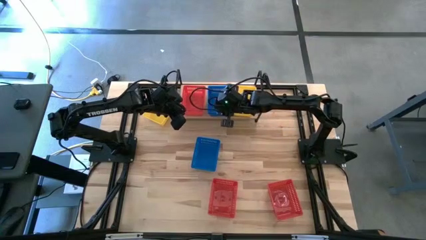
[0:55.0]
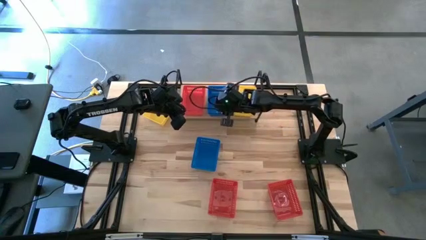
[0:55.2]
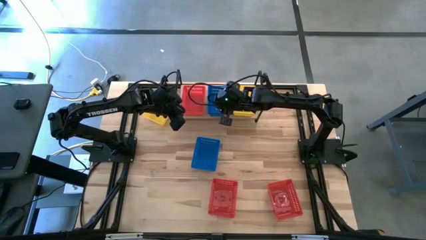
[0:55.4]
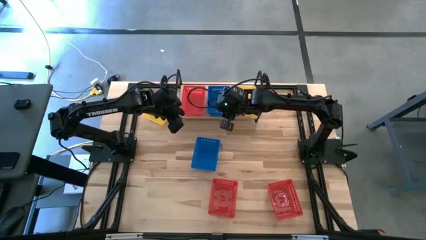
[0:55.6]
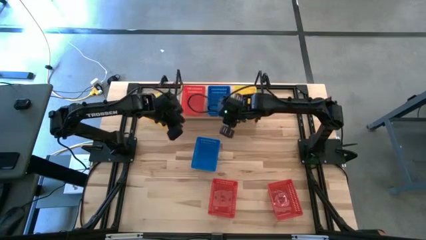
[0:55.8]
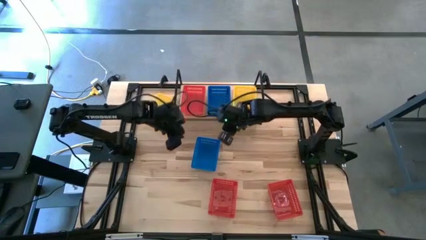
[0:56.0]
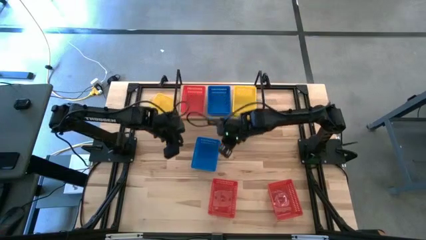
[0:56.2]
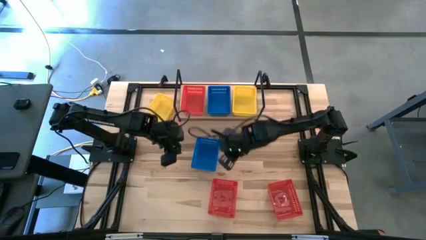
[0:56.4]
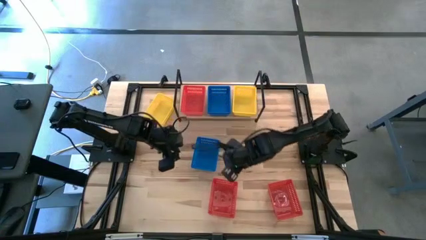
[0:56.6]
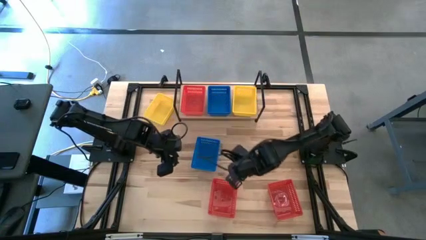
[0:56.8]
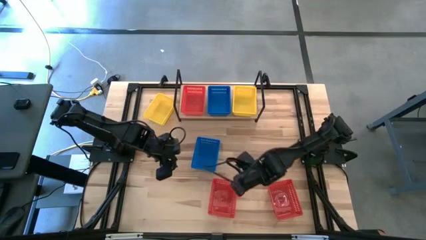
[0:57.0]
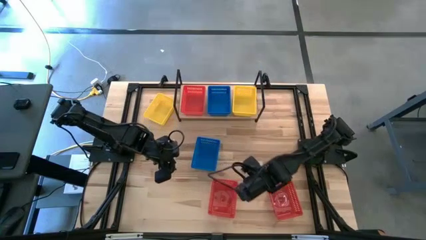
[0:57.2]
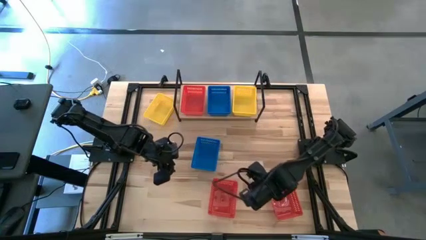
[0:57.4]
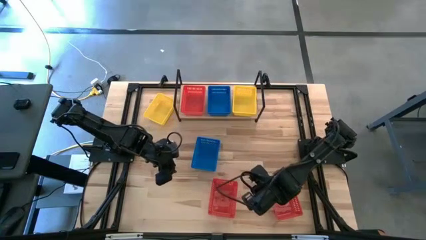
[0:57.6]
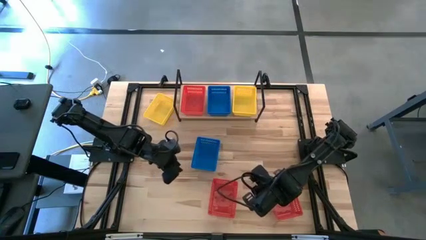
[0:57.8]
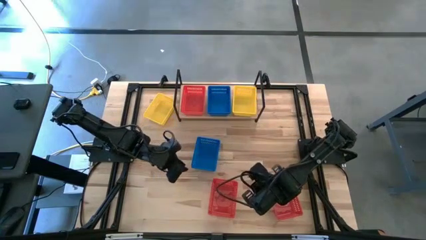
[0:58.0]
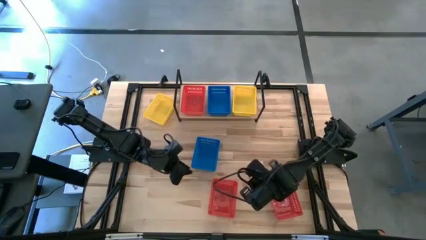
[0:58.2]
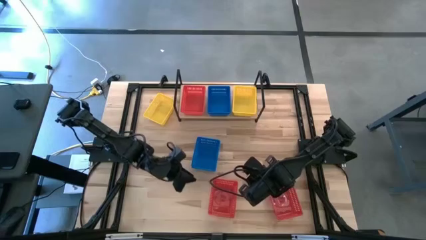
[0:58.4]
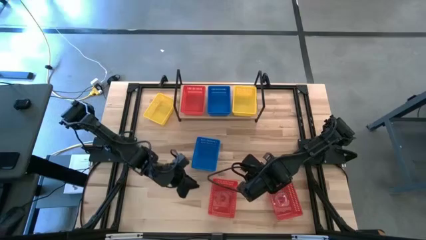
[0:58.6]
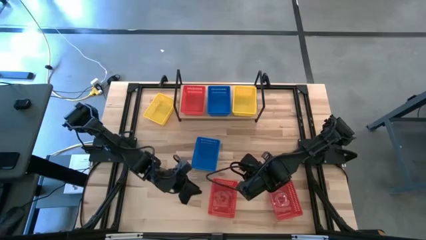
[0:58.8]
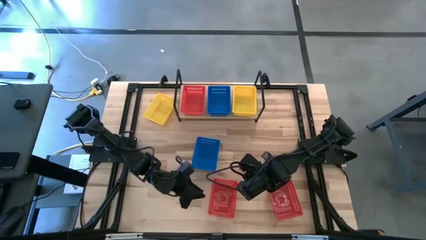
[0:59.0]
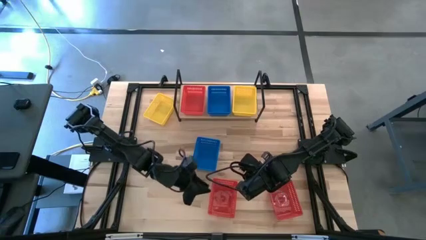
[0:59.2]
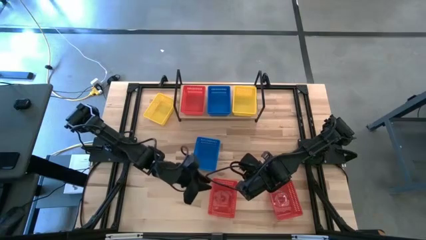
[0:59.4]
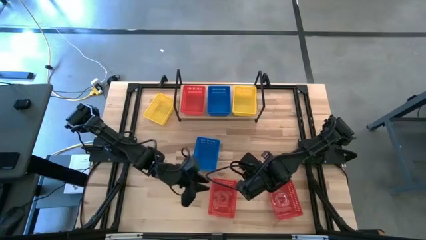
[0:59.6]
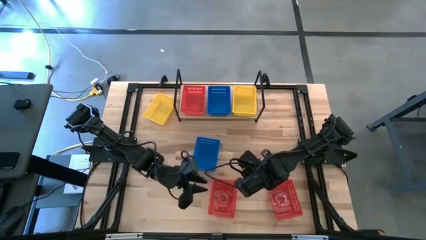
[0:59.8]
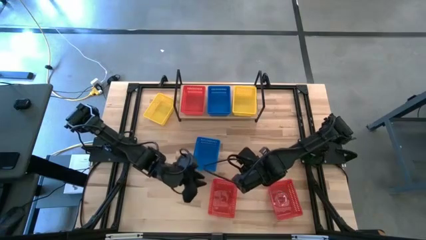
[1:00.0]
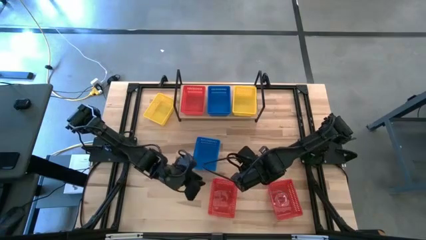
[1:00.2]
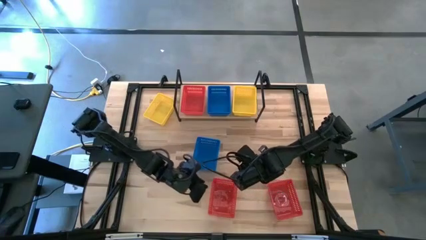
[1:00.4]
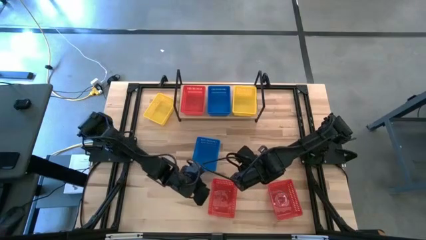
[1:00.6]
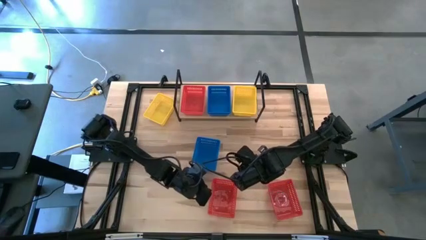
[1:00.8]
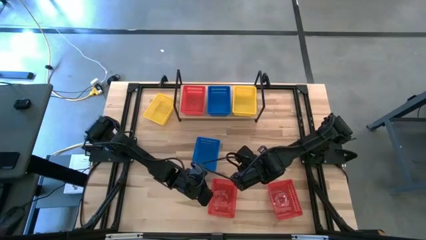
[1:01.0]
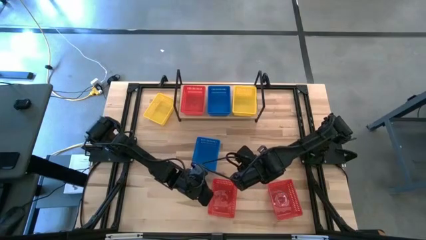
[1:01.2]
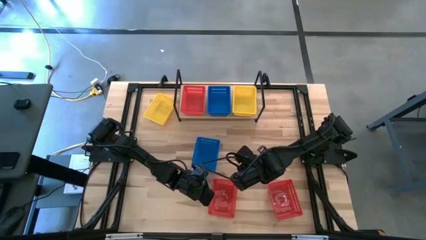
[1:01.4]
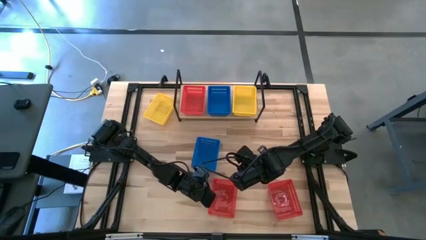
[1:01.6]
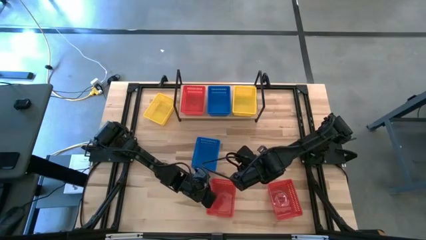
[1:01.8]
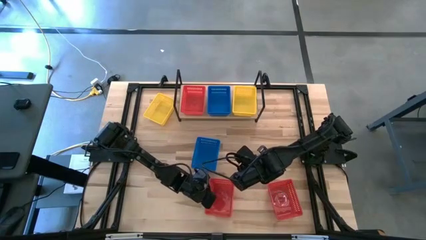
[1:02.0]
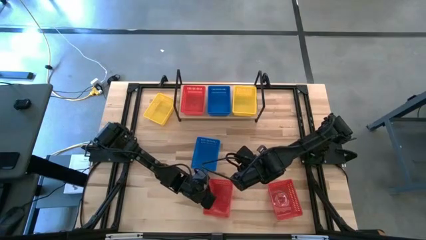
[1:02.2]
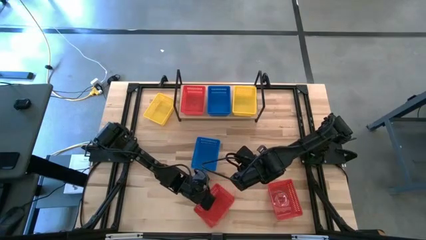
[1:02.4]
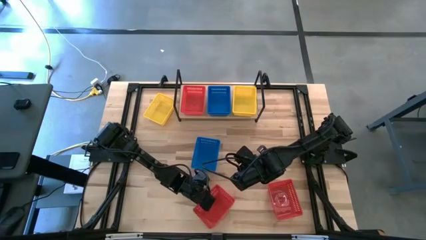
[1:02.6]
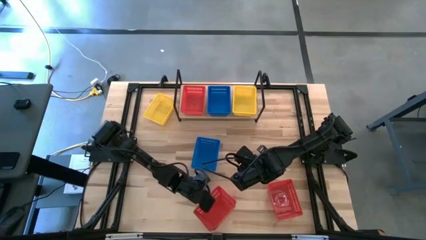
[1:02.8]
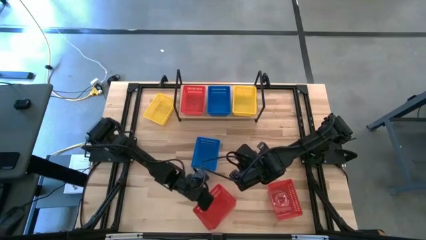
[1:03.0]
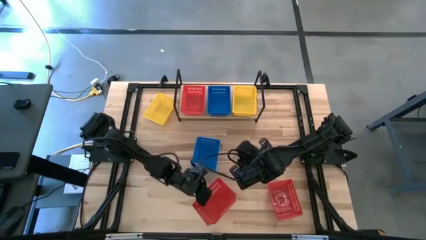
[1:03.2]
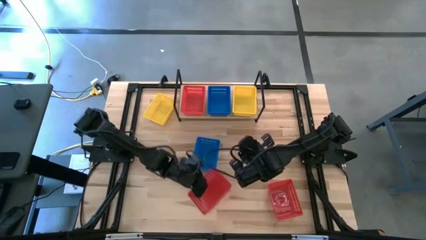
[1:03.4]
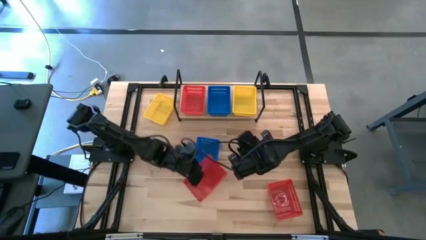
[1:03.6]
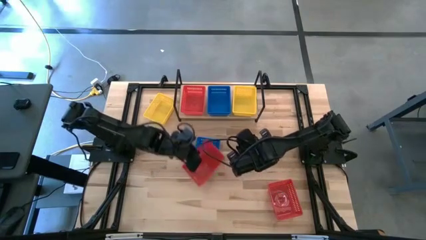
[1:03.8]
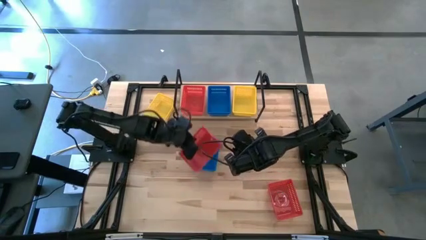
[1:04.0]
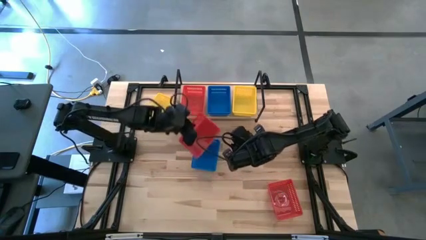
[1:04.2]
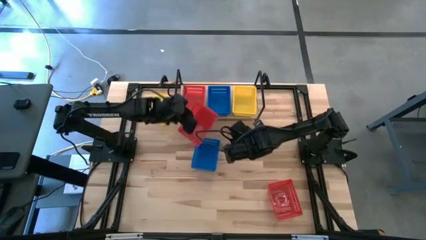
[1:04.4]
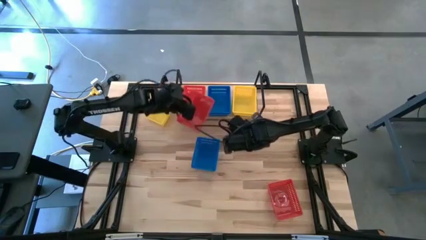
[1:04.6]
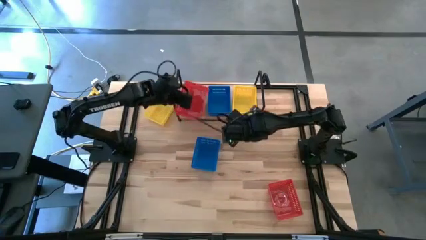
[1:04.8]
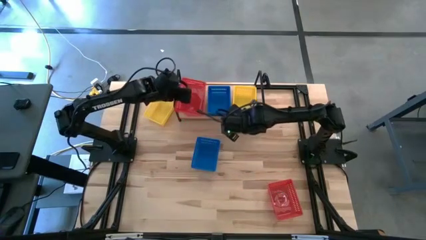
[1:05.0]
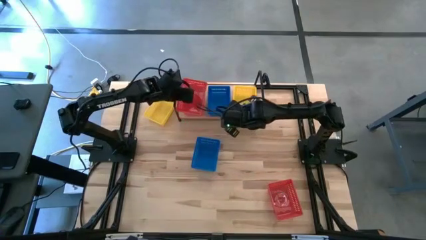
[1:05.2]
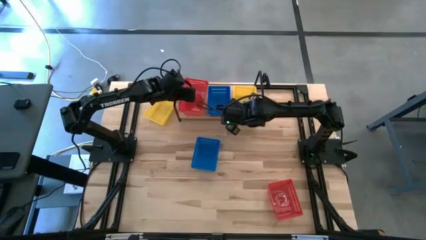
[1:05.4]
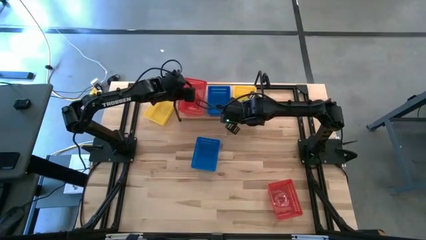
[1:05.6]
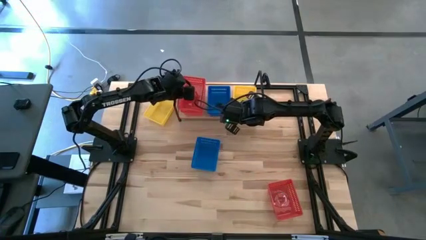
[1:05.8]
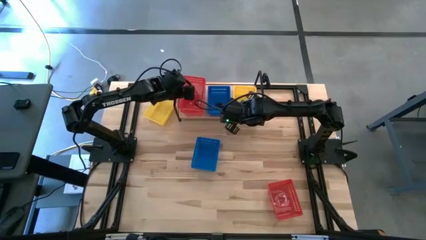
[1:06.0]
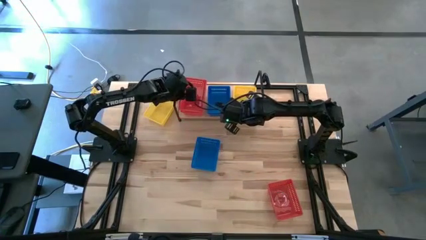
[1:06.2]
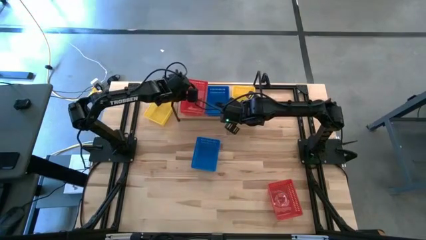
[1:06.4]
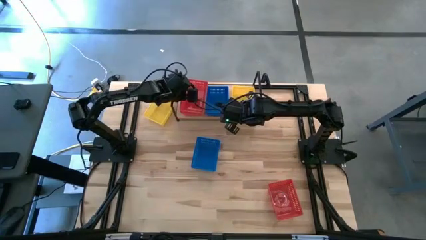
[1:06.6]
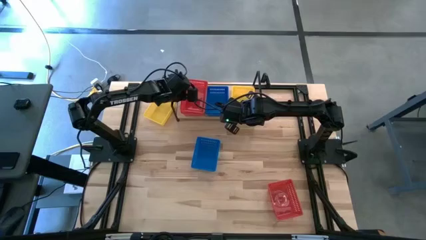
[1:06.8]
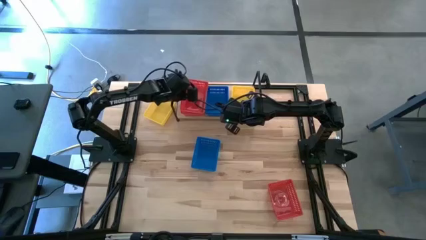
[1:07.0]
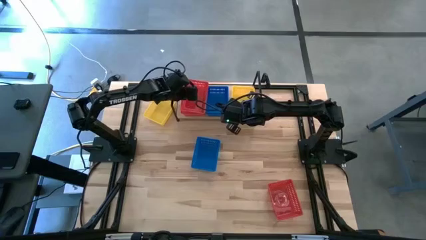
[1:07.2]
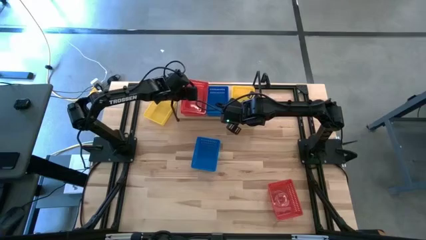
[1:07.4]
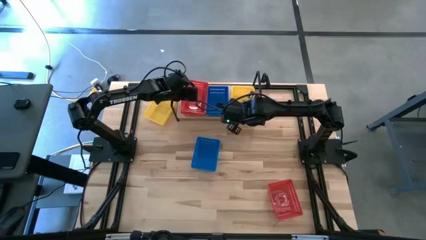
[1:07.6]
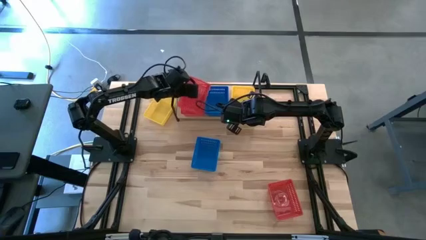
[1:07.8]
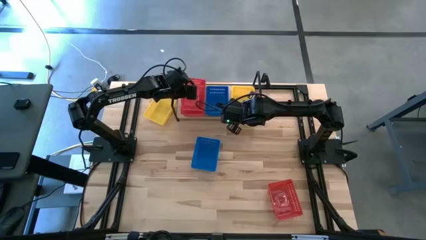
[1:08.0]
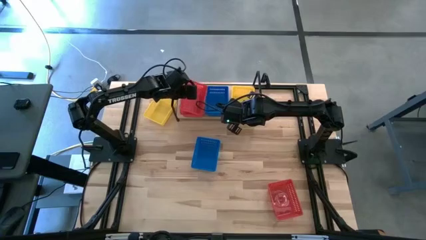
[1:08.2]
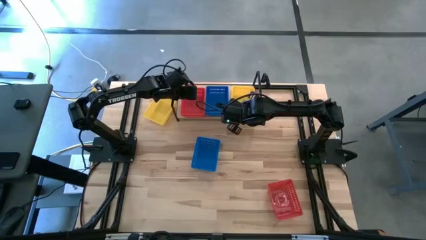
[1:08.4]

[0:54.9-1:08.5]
Task: Stack baskets on shelf by color
Stack the left red bin on top of the red bin on the shelf
